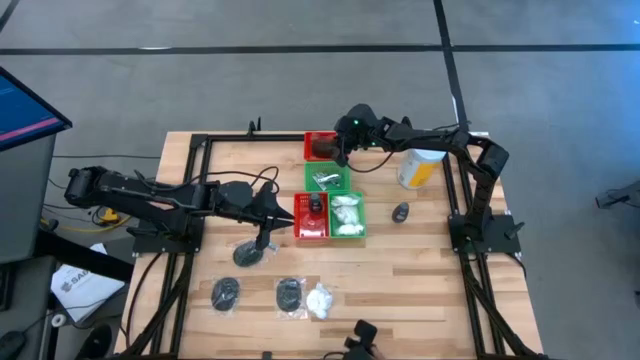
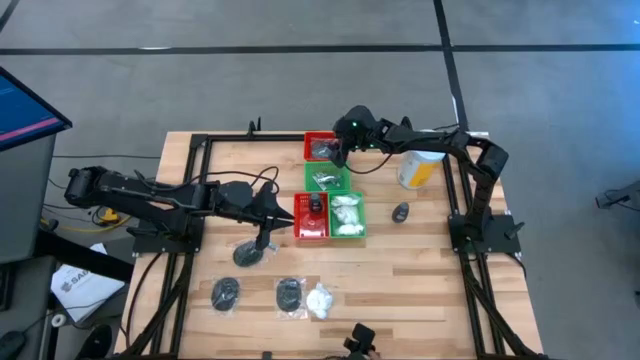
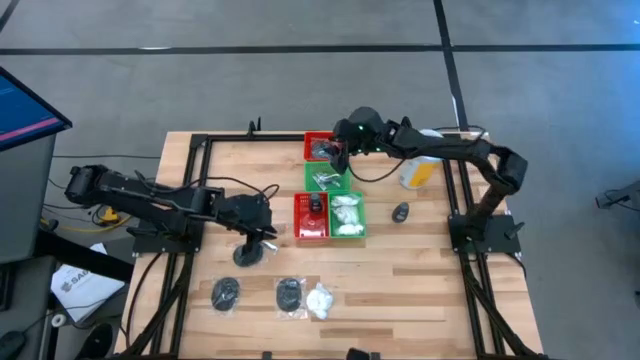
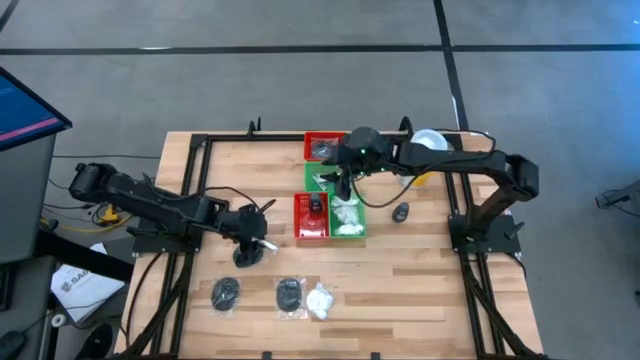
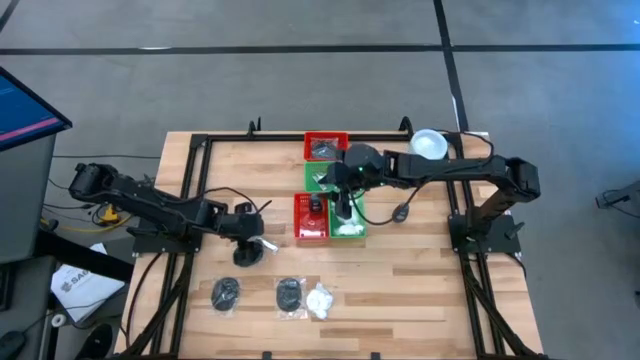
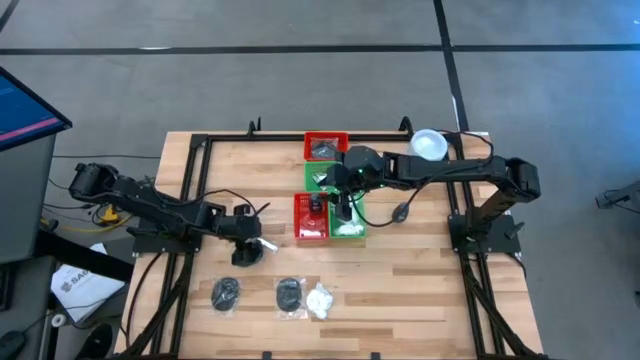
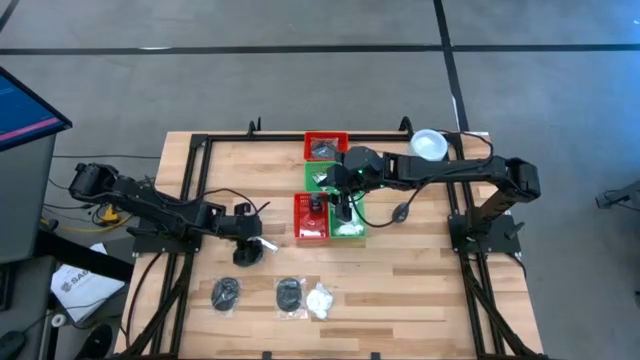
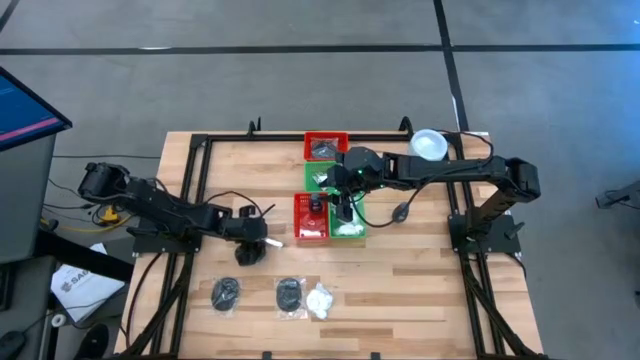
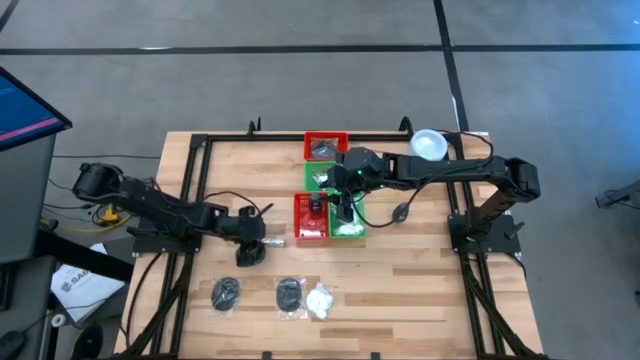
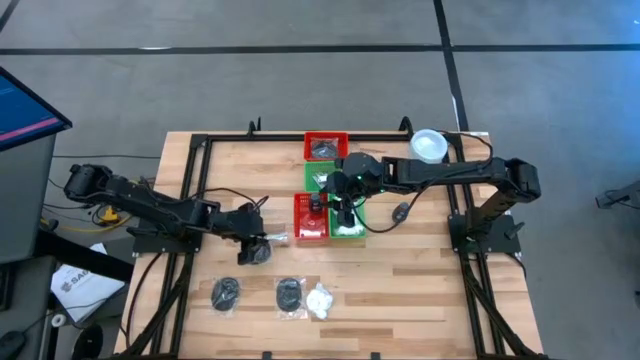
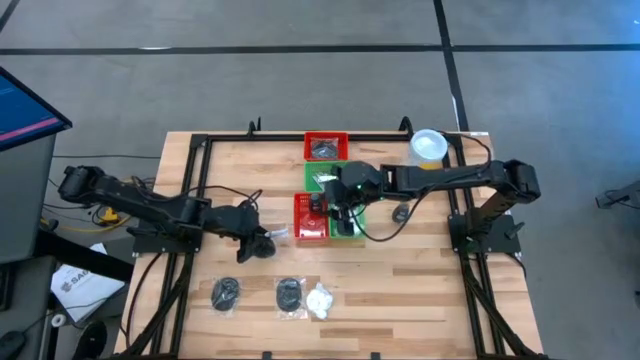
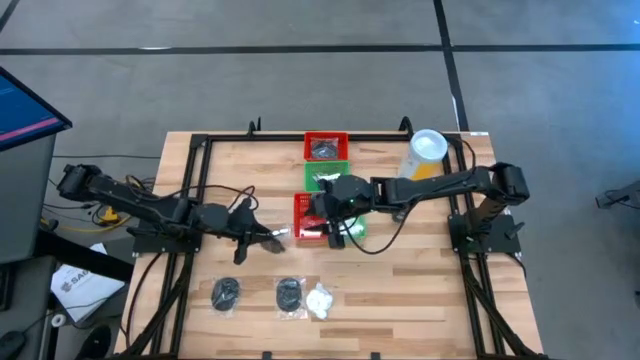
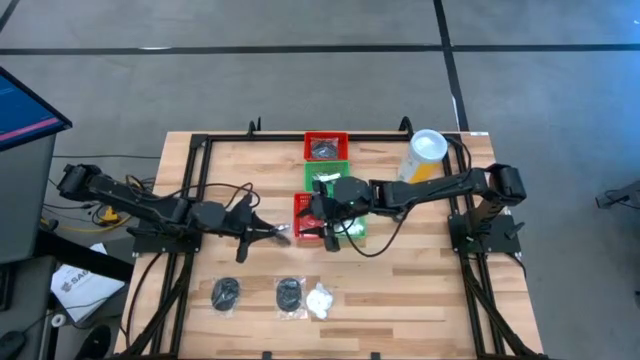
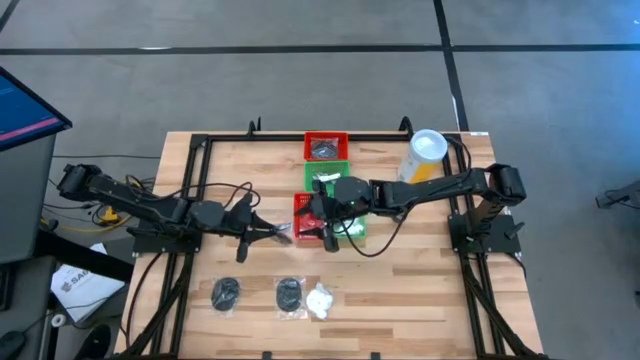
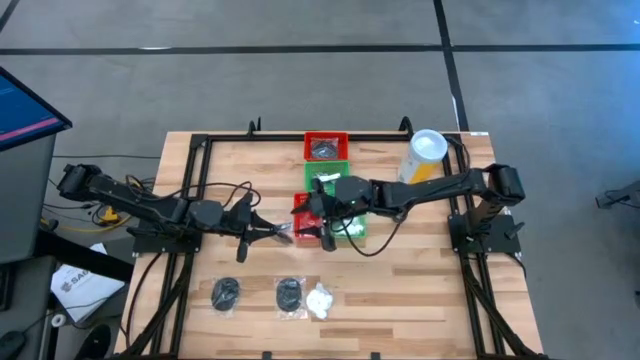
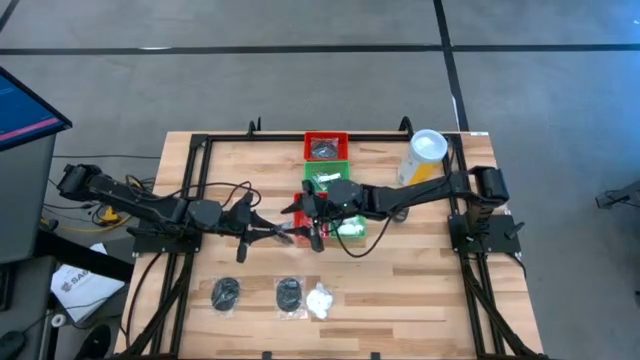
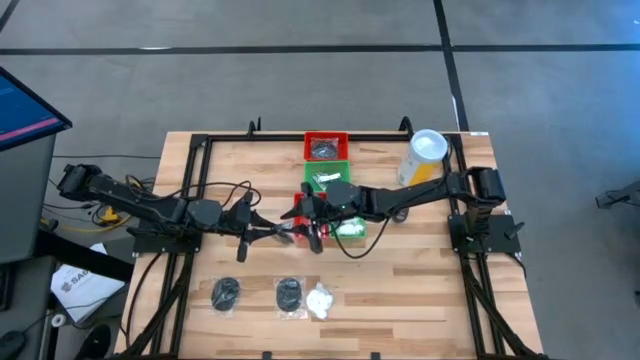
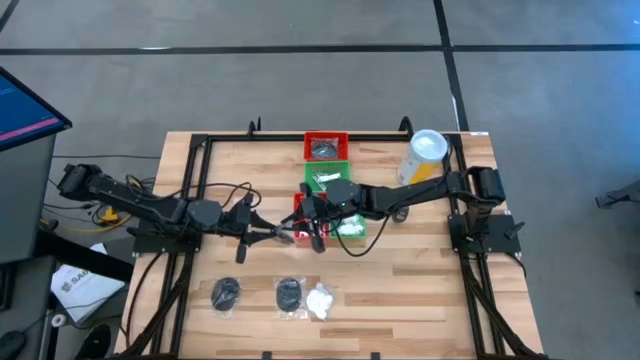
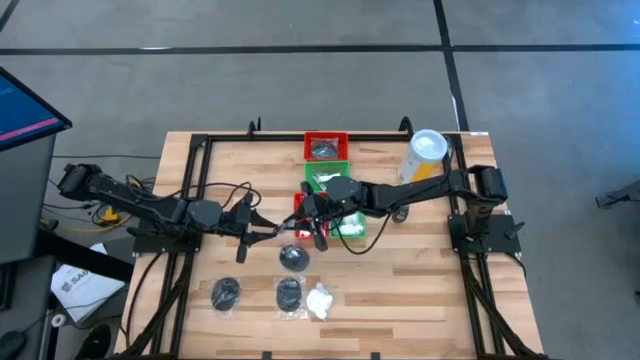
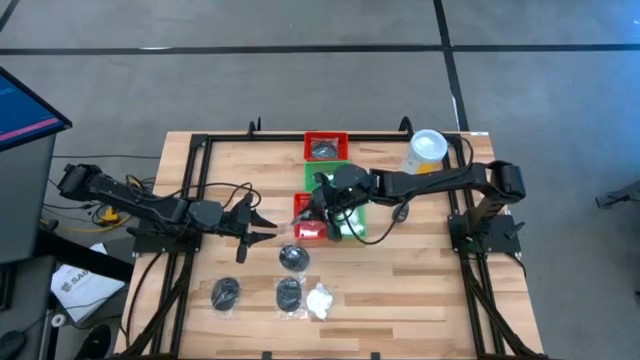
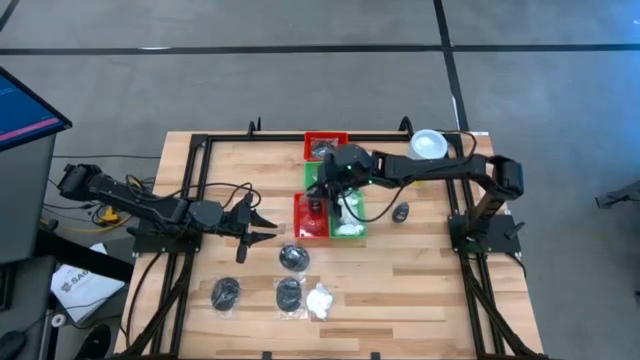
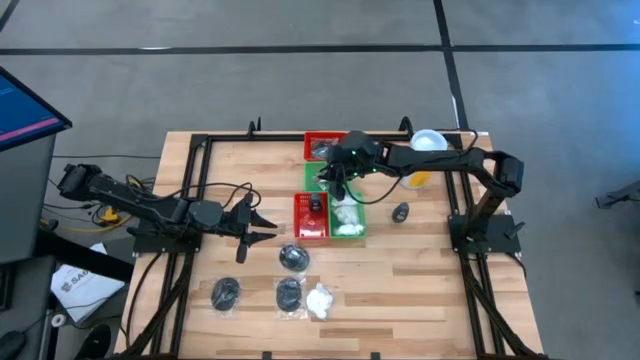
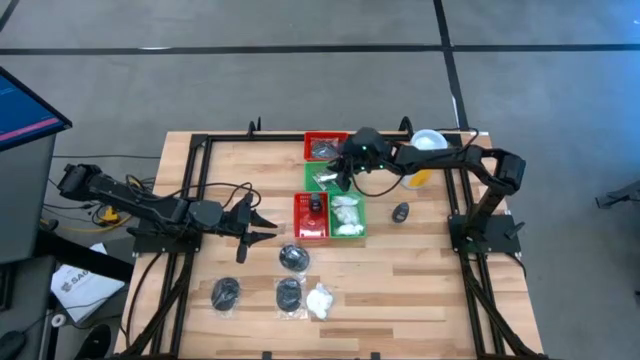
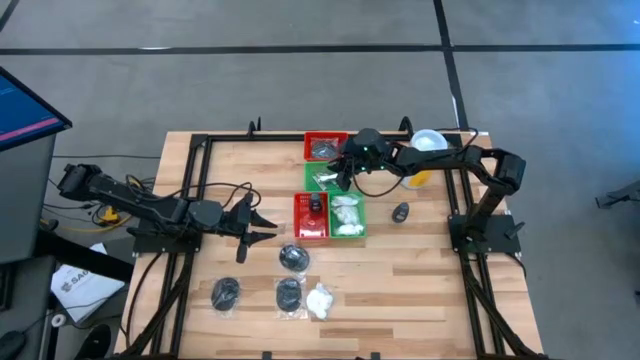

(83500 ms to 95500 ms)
Task: Pick & Place Travel size toiletries
Put the silver nail cutter into the top green bin

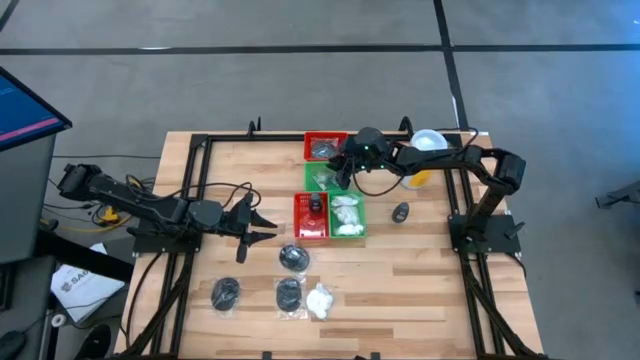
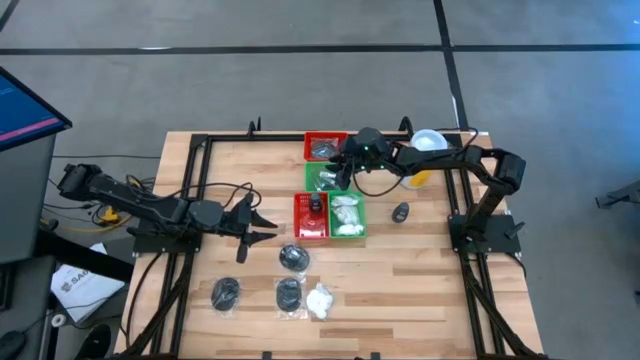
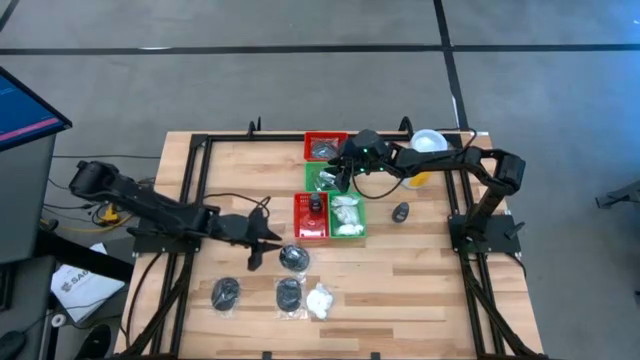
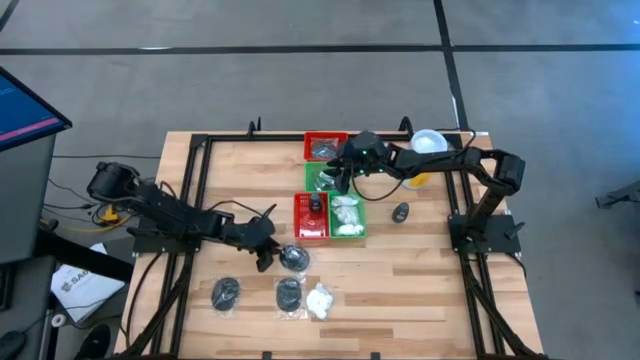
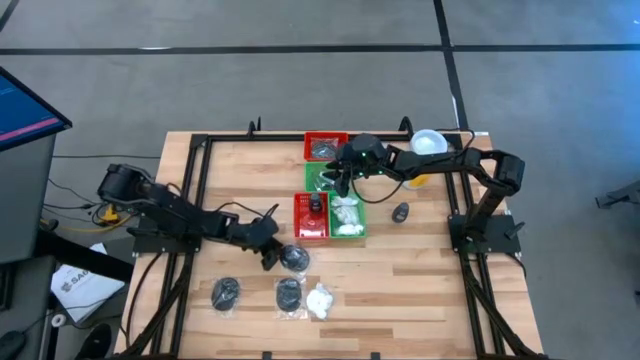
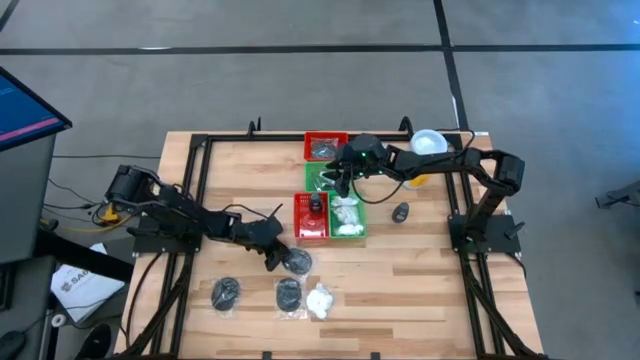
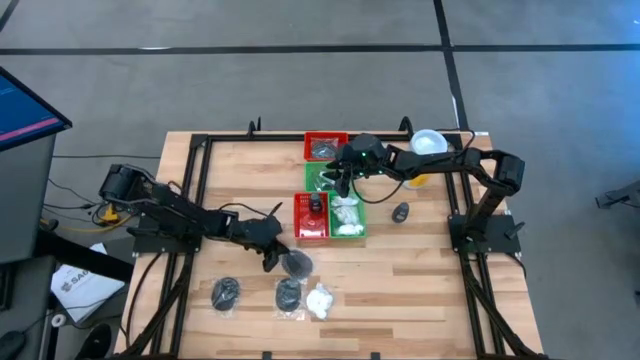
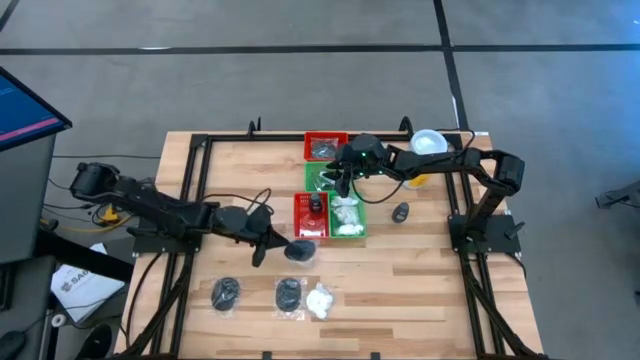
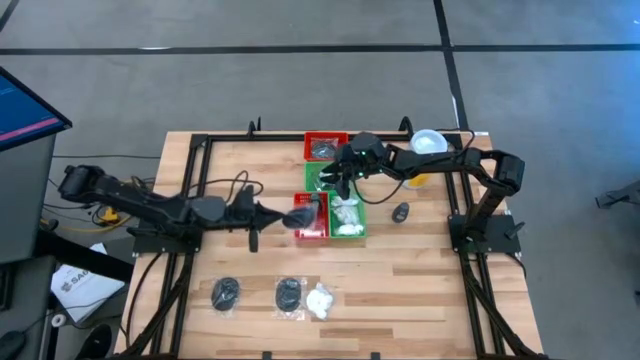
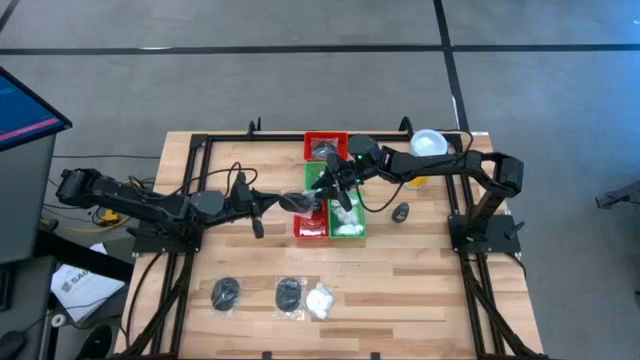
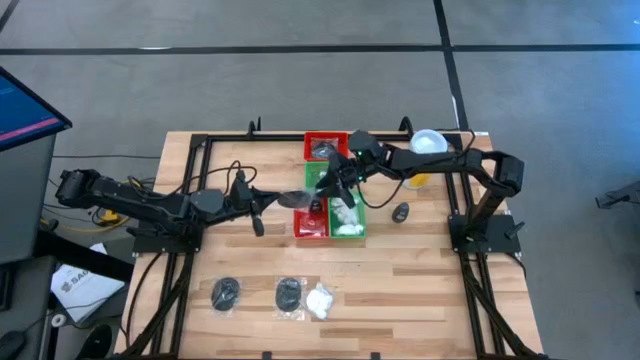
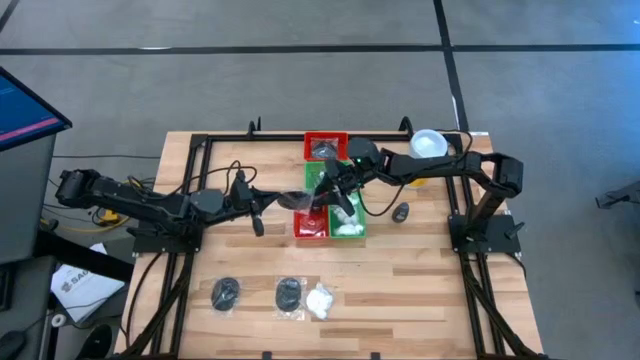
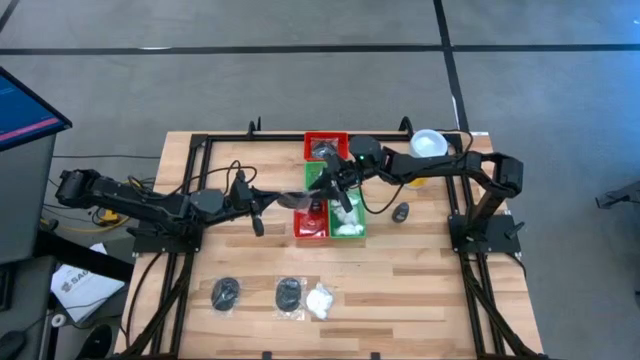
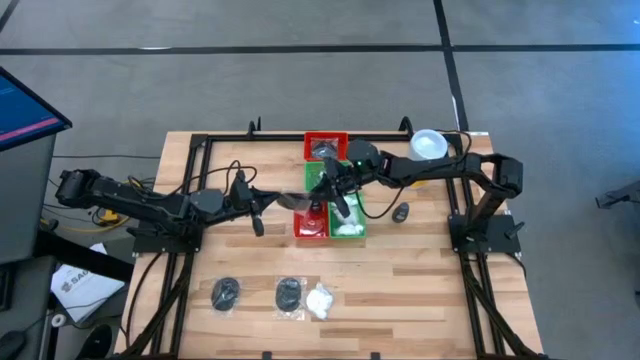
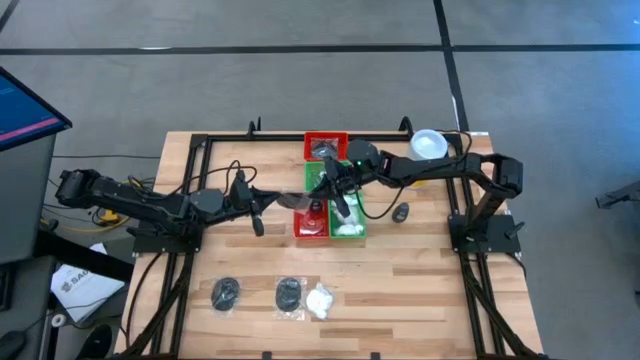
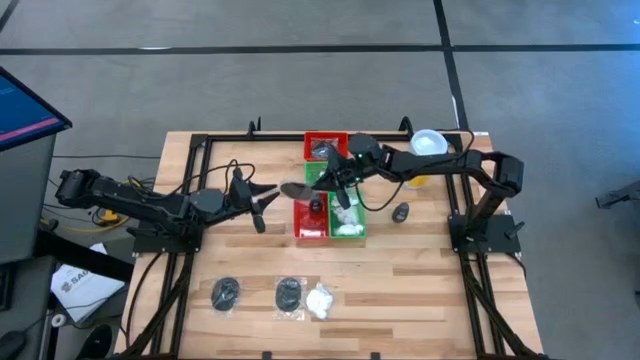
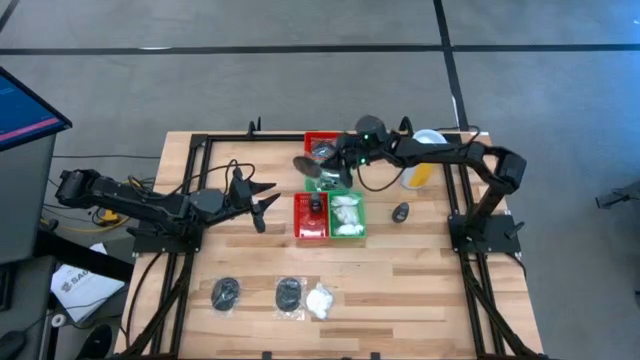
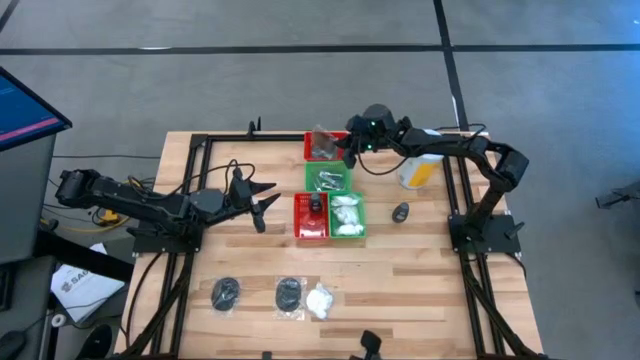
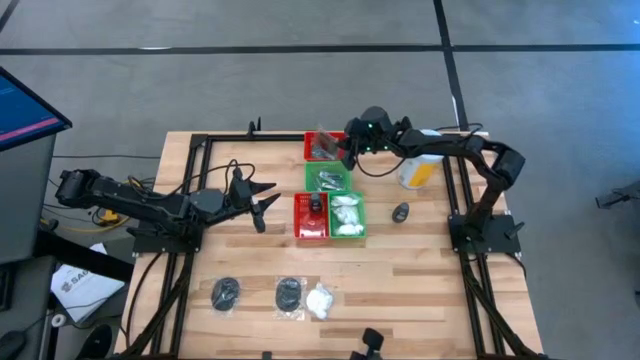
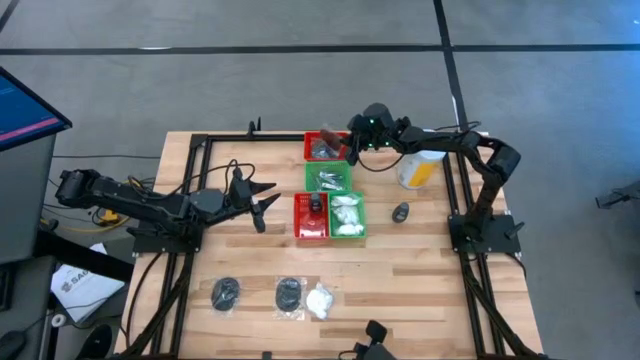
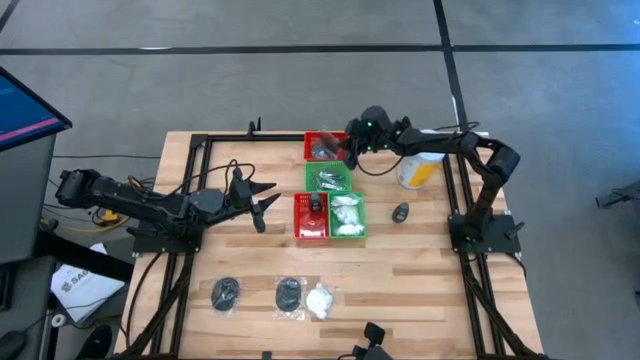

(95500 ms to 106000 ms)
Put the black hairbrush into the top red bin
